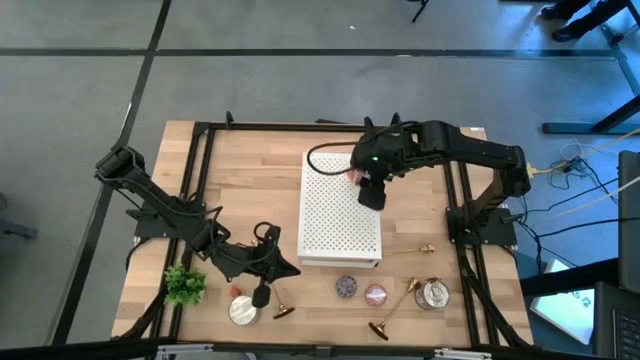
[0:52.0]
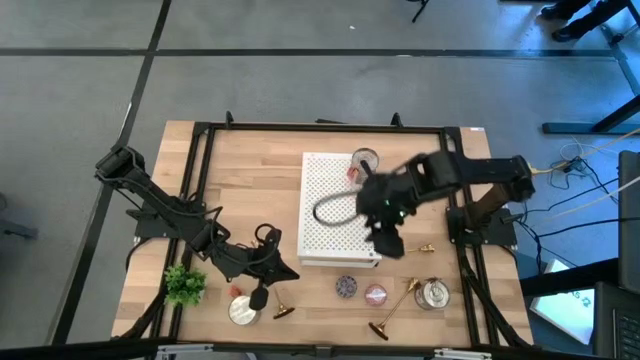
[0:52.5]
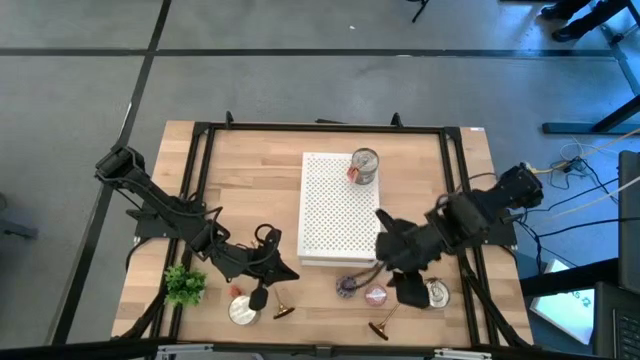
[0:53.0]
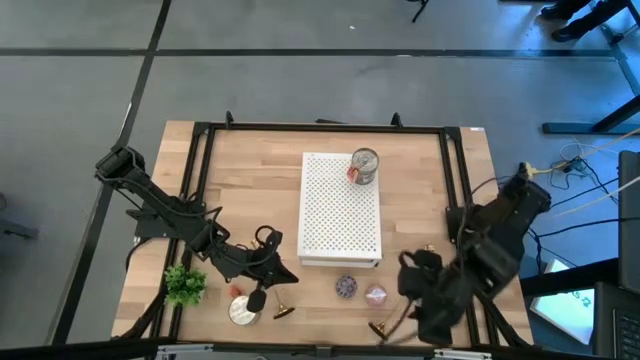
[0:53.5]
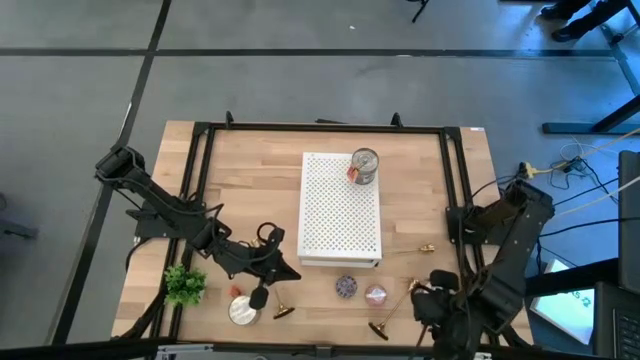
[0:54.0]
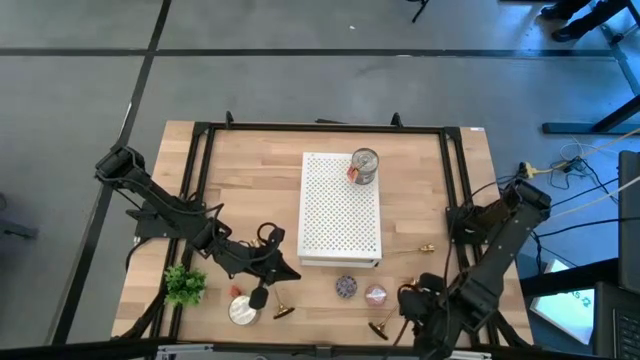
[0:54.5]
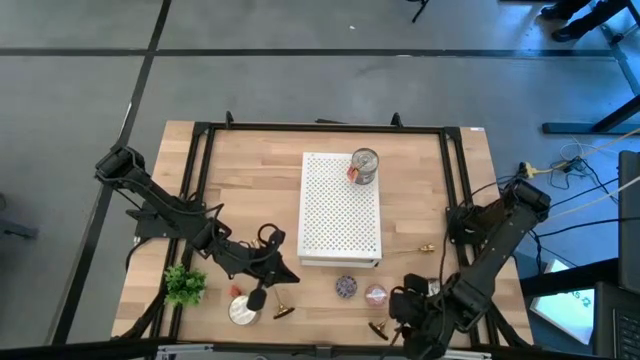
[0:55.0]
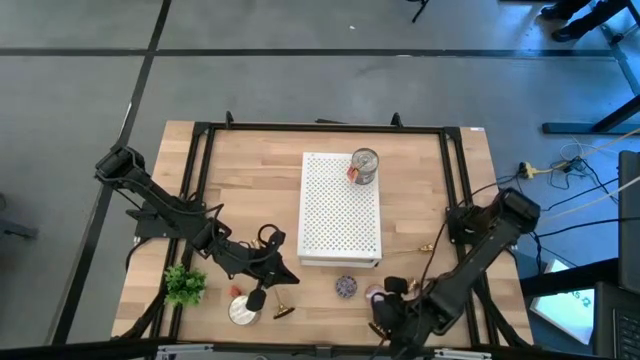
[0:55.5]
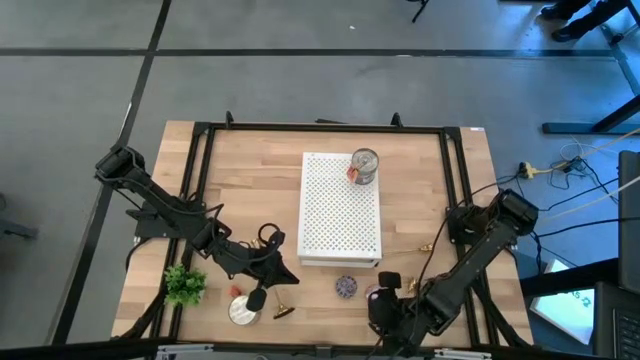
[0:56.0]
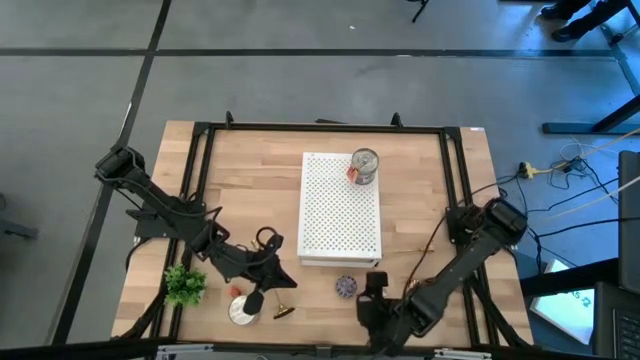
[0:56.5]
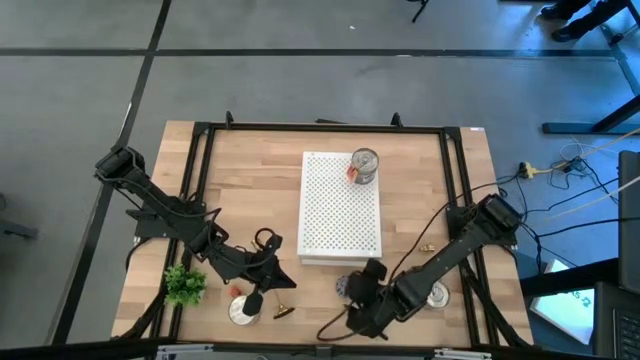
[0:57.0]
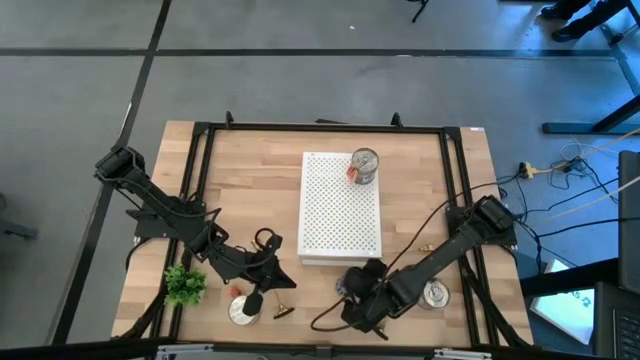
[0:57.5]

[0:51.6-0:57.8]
Task: Pick & Place candle stick holders
Put the black scented candle on the shelf

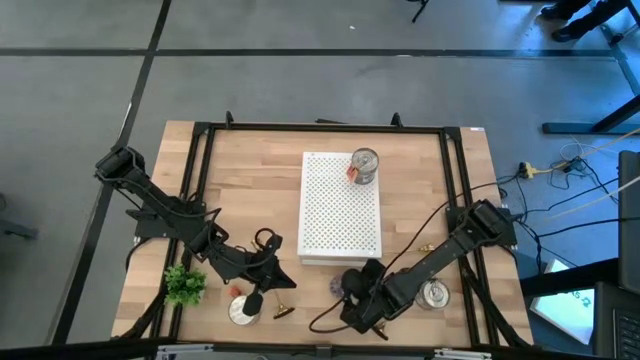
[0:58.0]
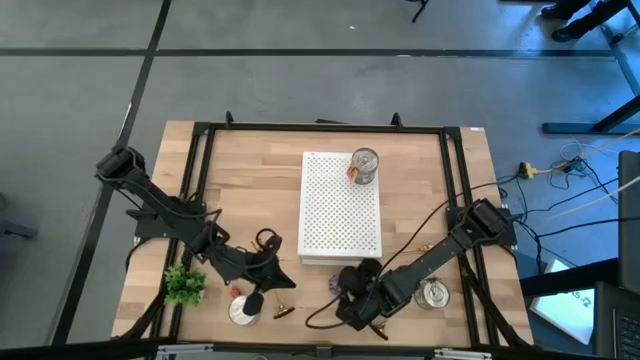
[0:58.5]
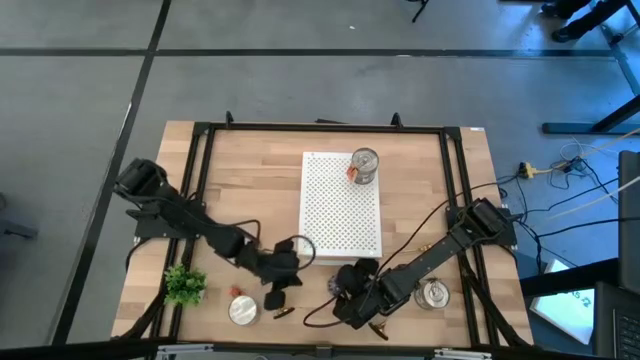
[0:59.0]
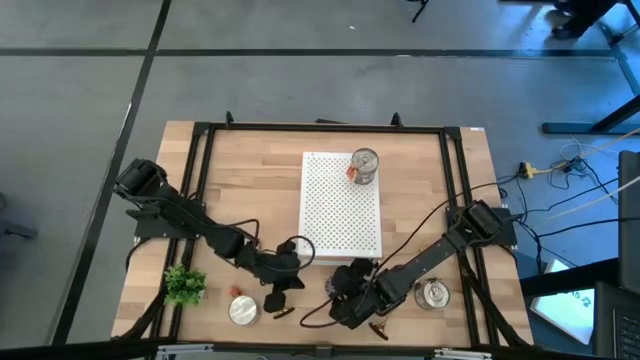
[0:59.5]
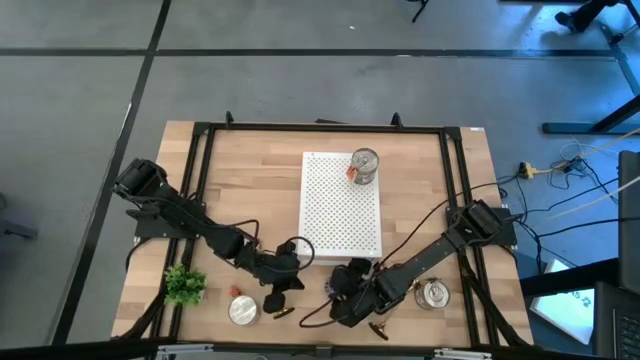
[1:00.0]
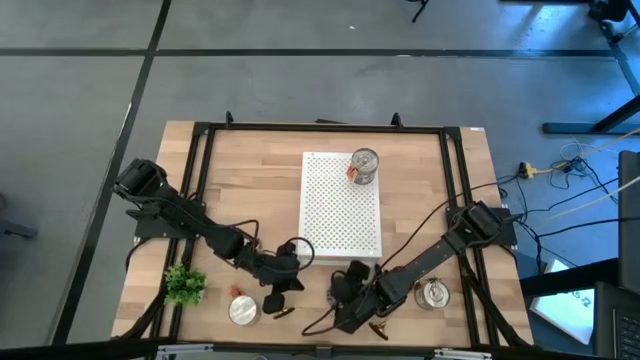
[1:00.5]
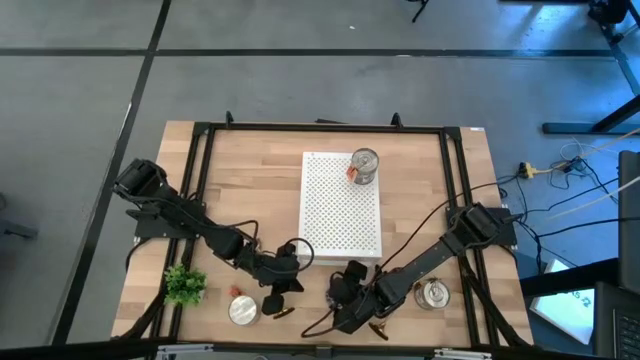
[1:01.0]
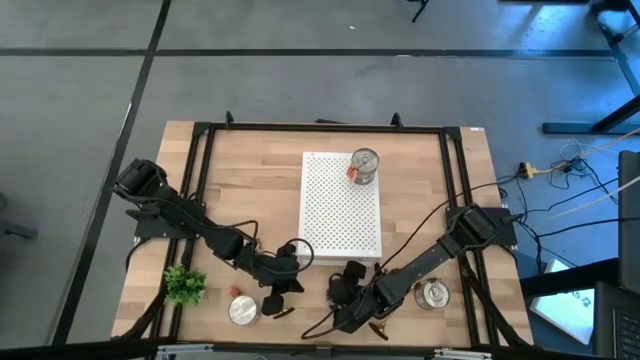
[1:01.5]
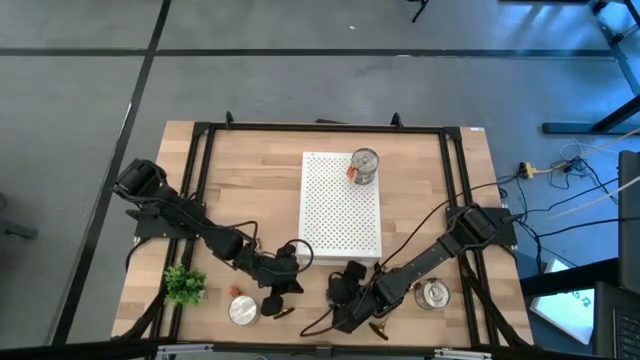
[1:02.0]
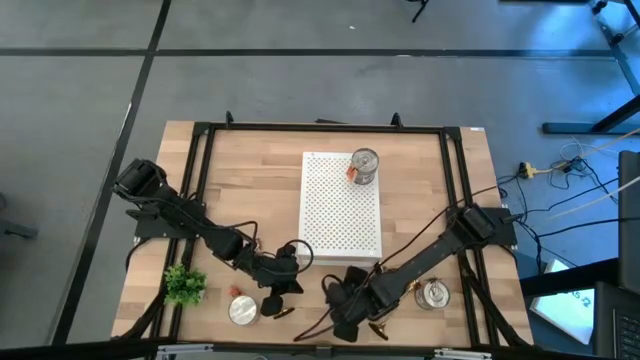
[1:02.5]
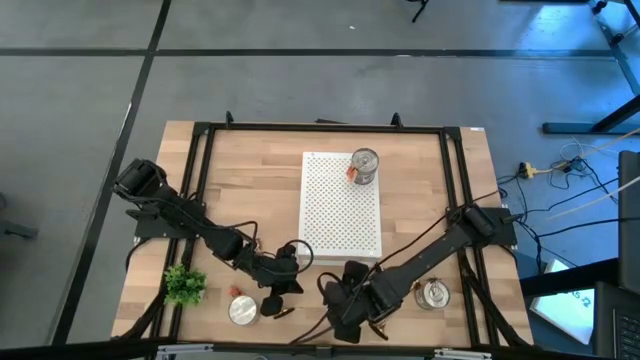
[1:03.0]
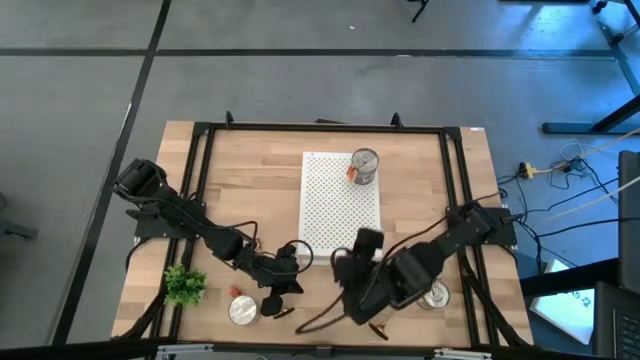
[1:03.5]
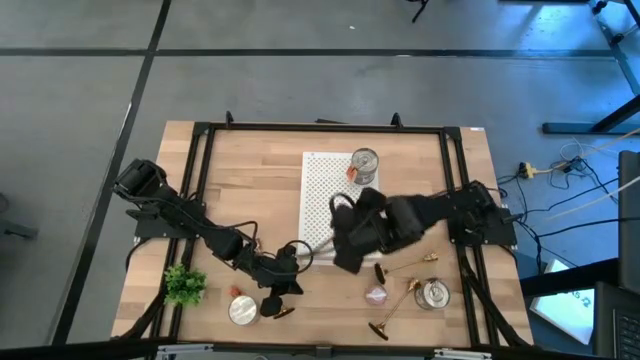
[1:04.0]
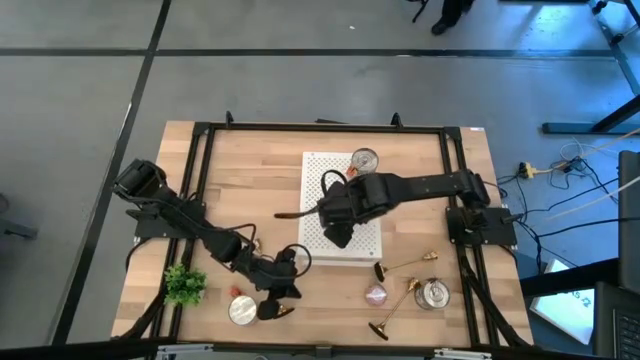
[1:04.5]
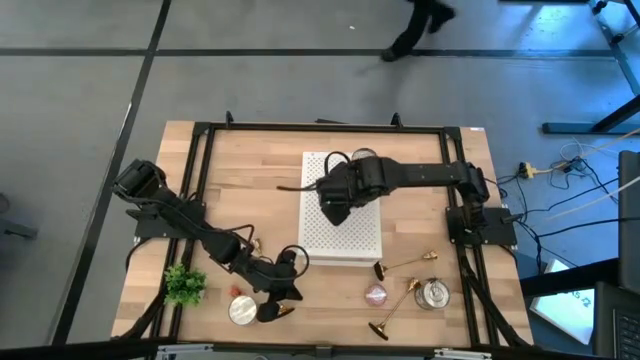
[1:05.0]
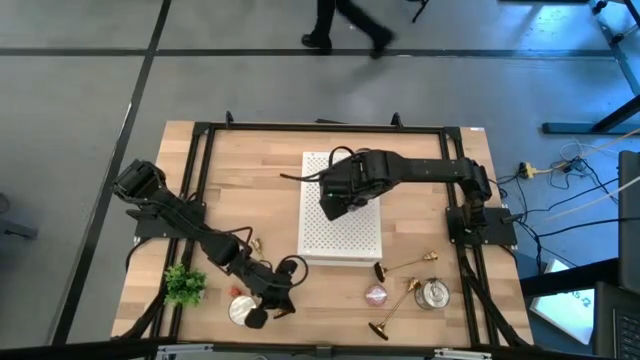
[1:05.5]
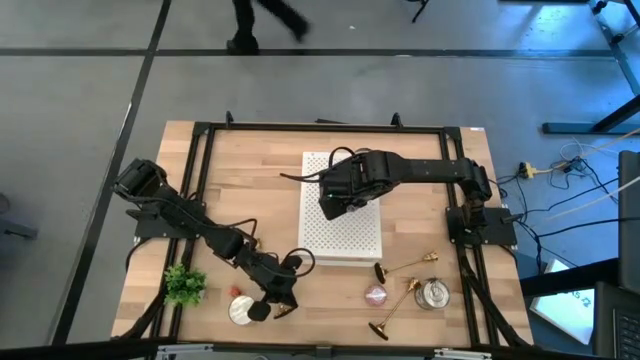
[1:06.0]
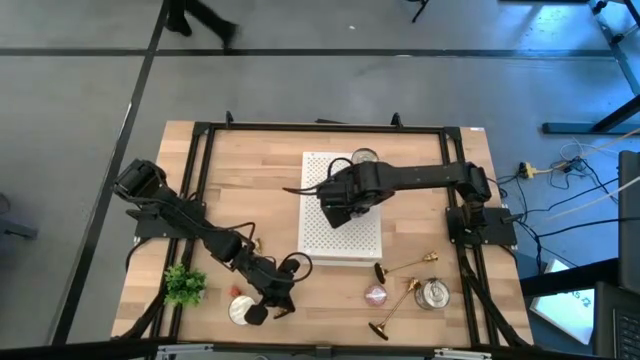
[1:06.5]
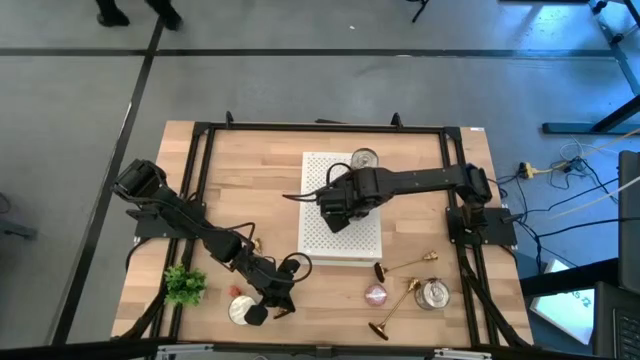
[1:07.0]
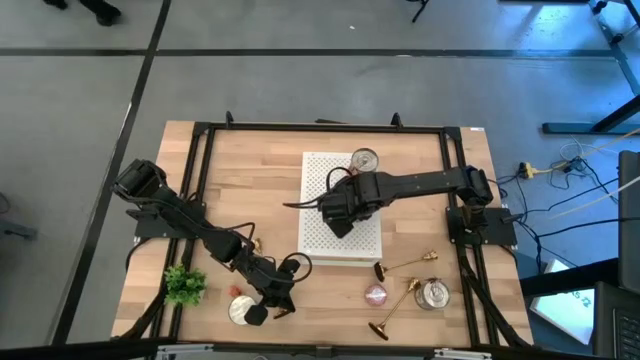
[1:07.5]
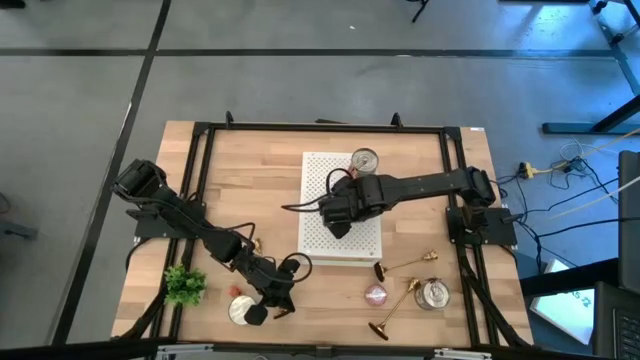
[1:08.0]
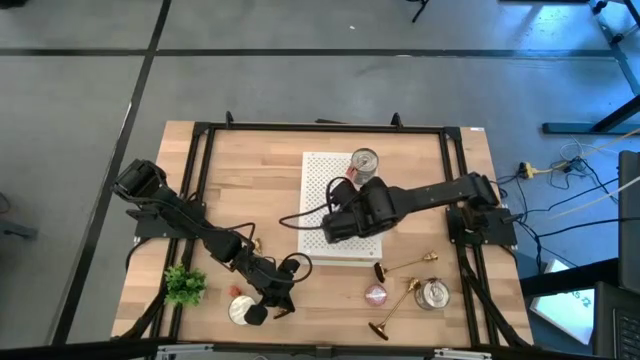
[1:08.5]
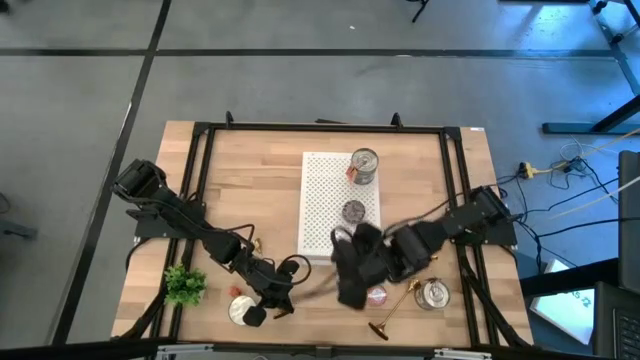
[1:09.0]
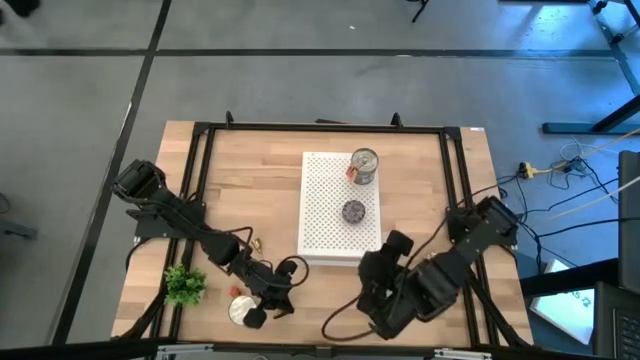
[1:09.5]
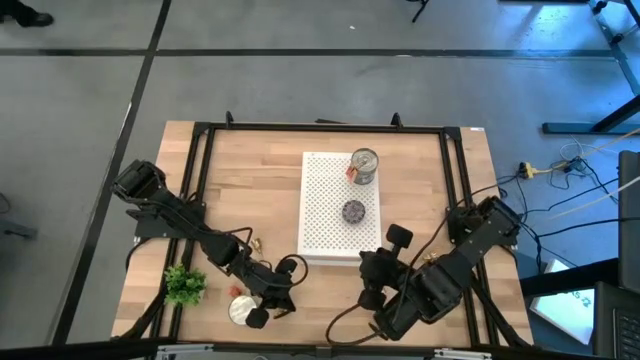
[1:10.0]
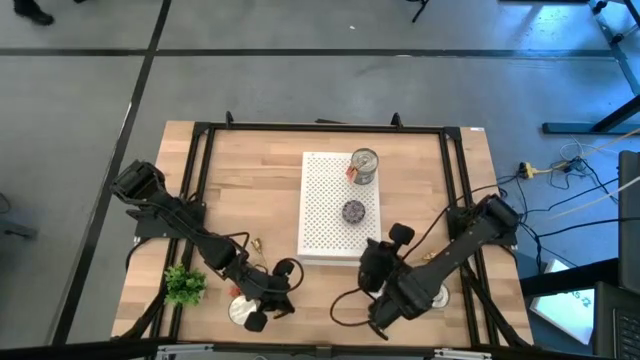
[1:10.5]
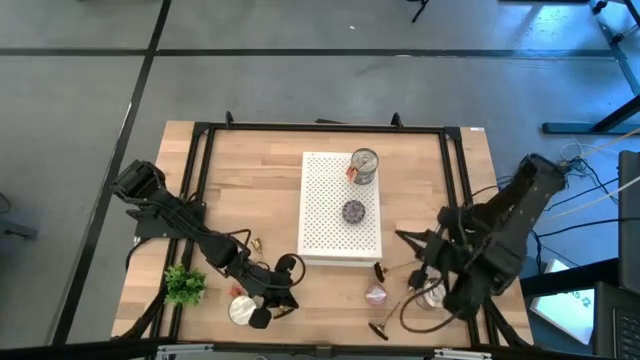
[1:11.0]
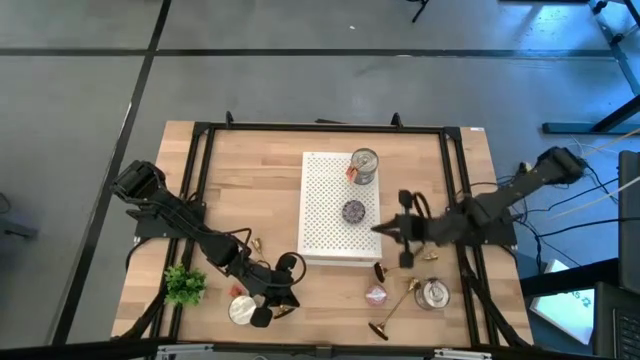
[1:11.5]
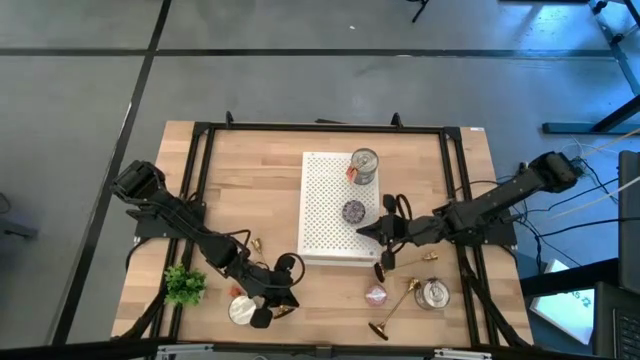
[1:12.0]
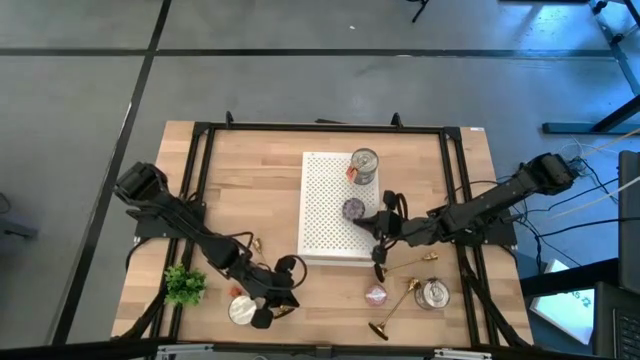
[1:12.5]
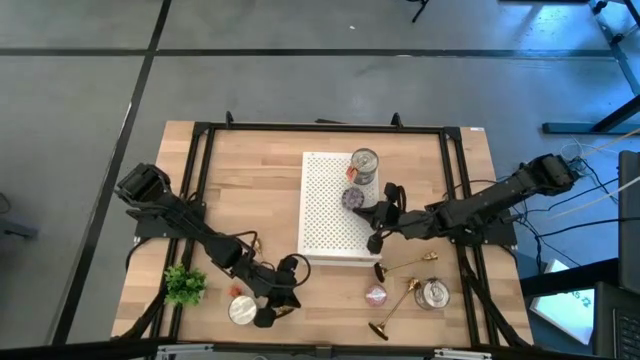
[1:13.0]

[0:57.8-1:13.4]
Put the black scented candle on the shelf
